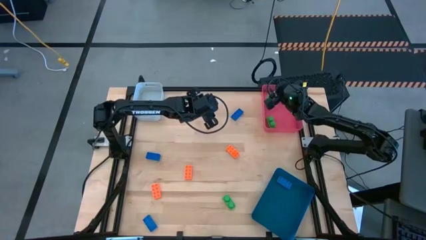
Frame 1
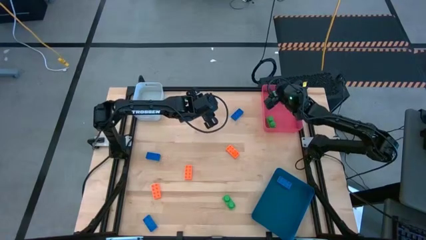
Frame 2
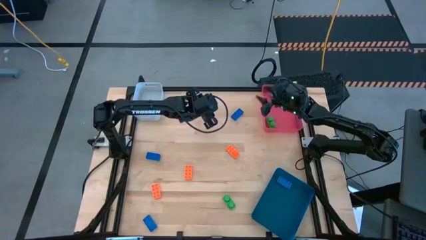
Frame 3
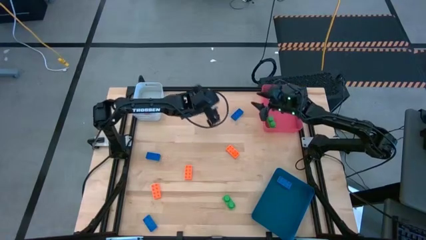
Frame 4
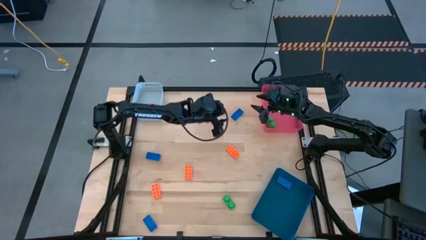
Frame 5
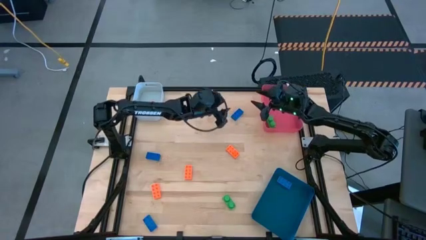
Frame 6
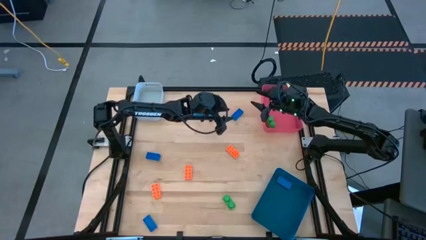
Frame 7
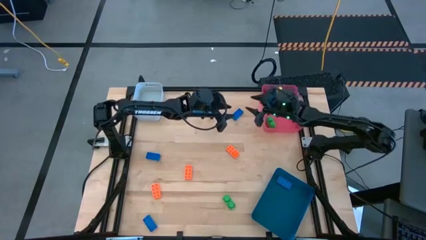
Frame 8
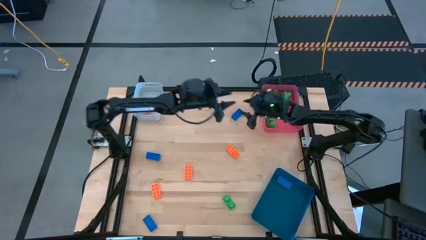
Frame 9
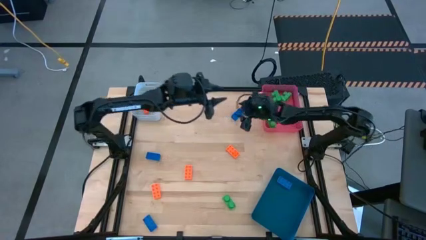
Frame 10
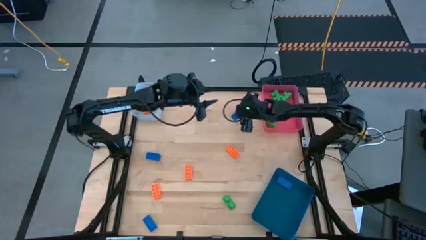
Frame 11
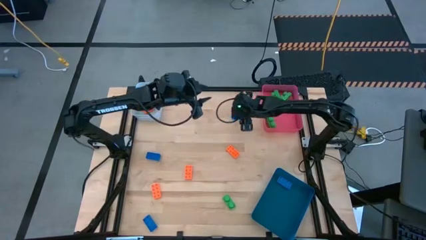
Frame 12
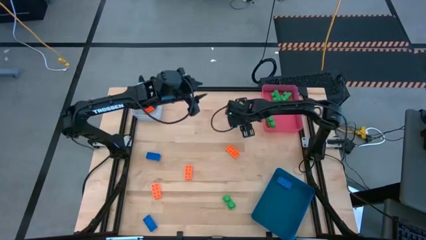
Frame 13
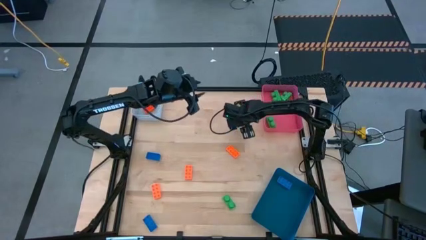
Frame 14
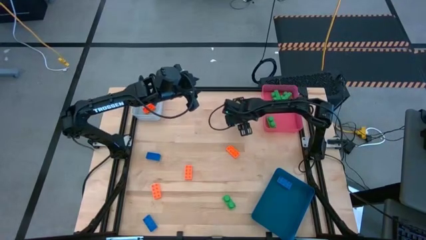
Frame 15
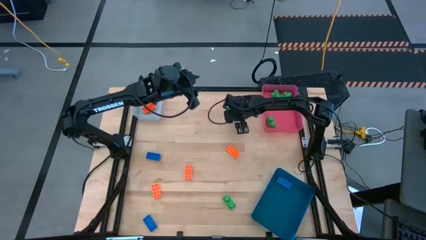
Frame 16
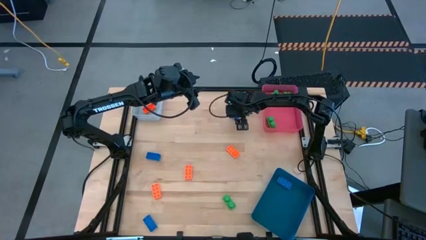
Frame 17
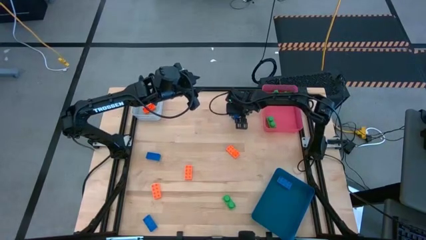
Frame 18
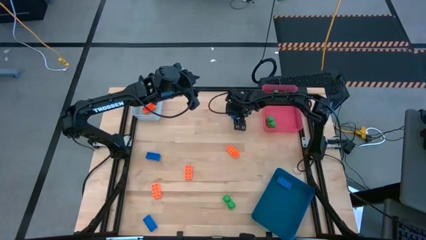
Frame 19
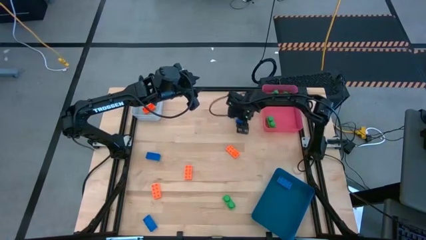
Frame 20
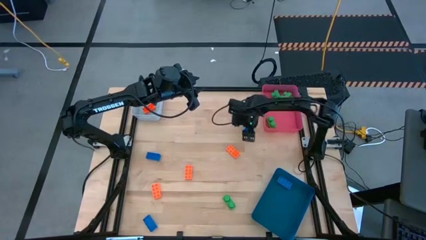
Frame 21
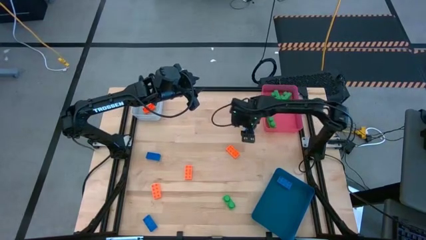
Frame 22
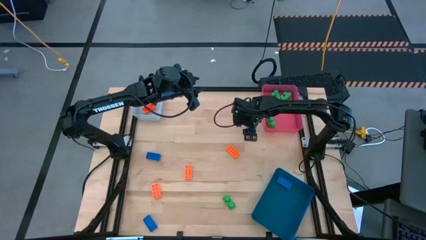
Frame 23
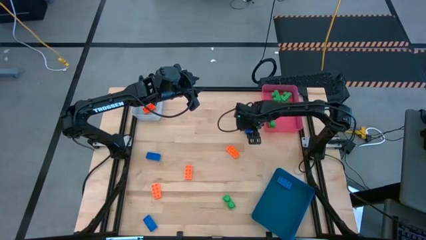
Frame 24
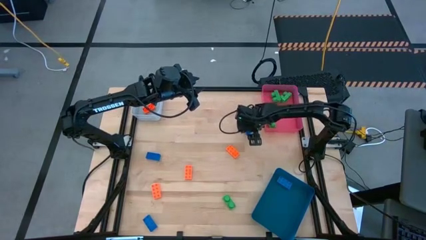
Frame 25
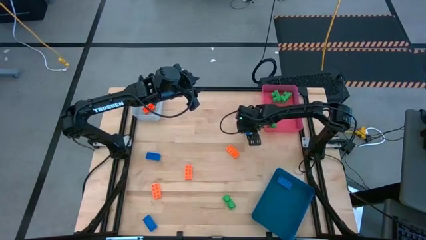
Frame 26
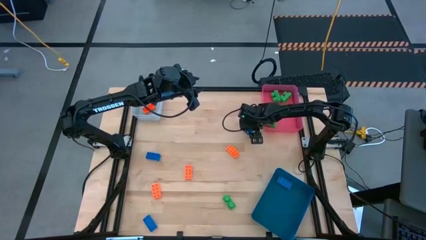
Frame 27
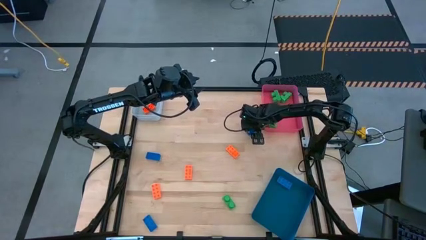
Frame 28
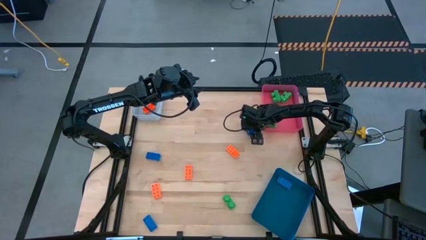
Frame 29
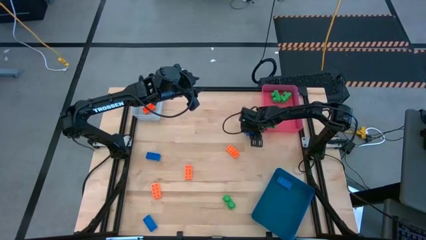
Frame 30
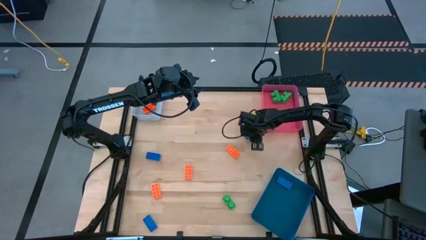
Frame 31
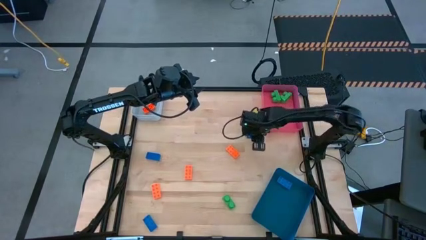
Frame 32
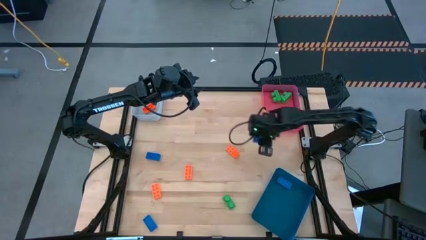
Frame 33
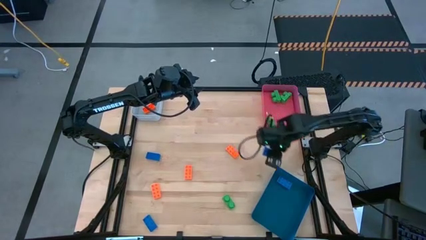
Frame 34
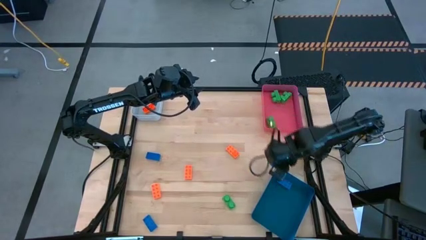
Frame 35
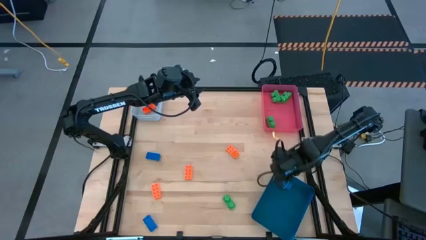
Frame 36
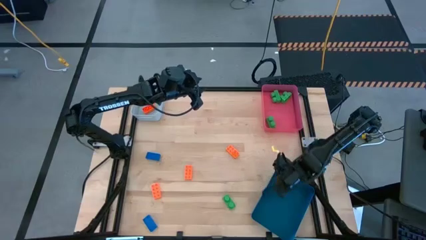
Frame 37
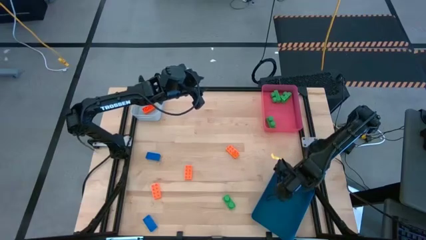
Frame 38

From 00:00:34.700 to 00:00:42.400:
Task: Sort & place blocks by color
Put the blue gamepiece into the blue bin

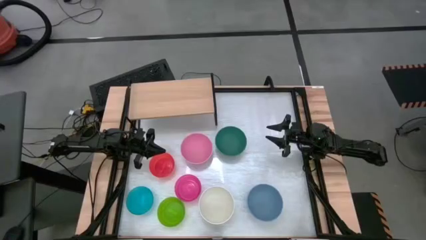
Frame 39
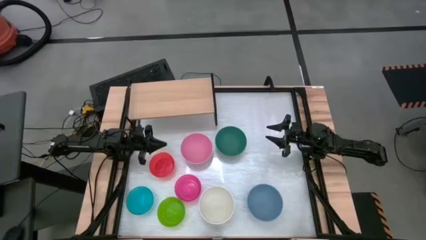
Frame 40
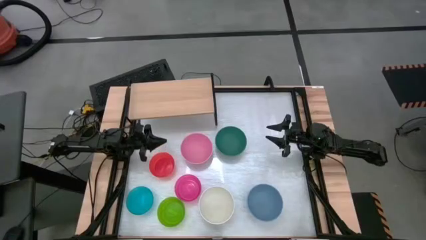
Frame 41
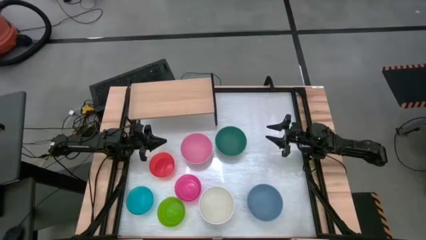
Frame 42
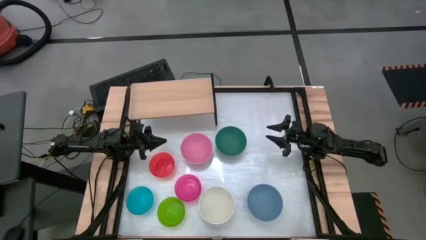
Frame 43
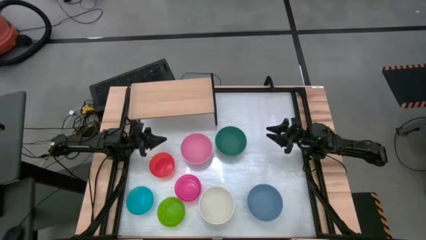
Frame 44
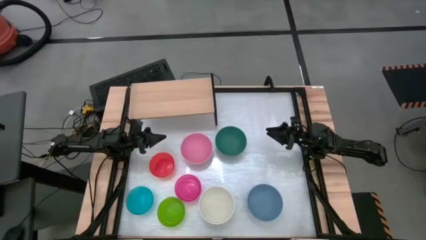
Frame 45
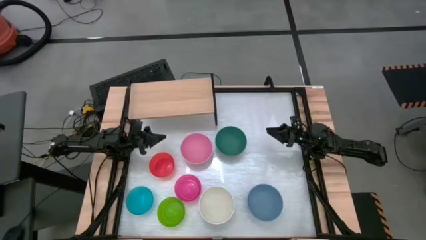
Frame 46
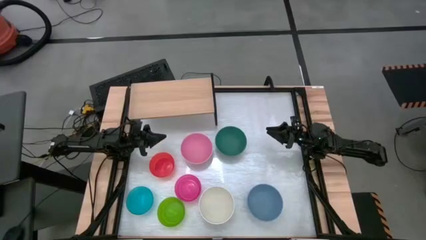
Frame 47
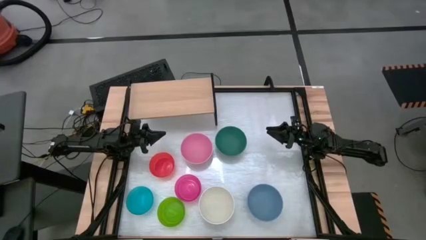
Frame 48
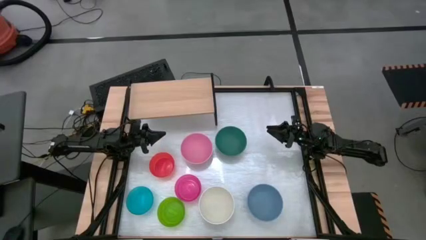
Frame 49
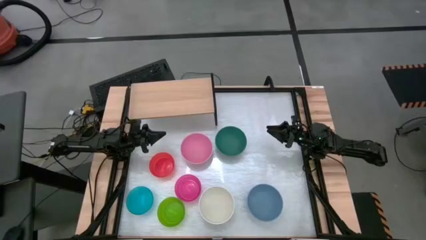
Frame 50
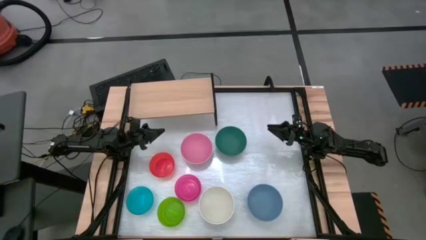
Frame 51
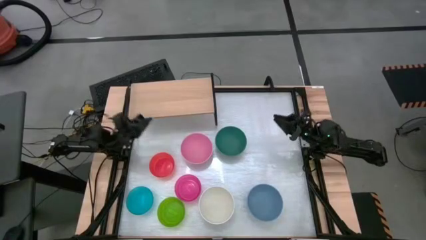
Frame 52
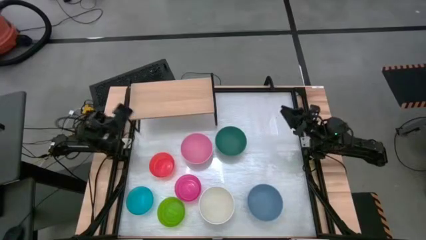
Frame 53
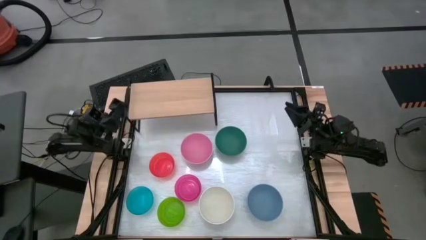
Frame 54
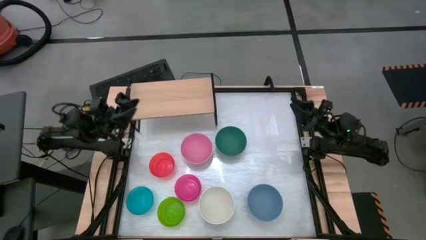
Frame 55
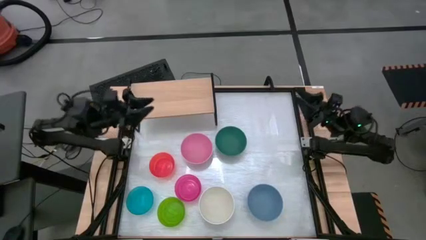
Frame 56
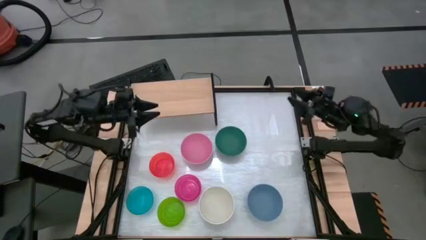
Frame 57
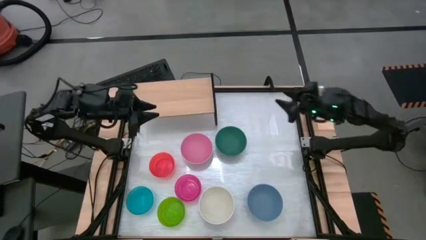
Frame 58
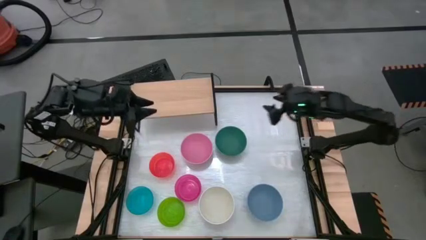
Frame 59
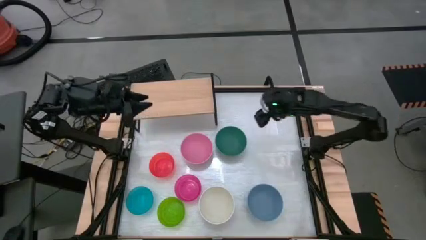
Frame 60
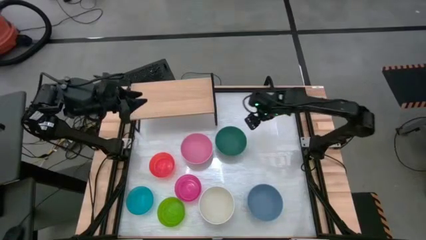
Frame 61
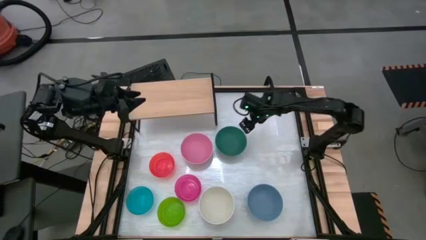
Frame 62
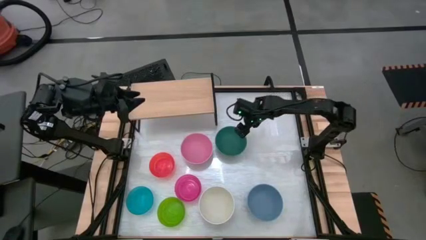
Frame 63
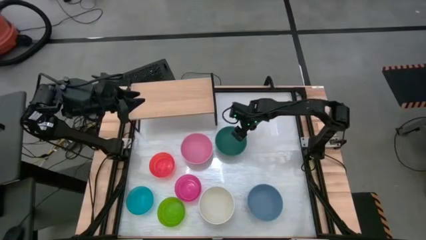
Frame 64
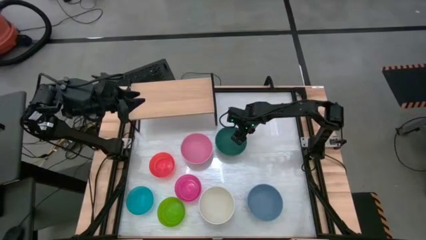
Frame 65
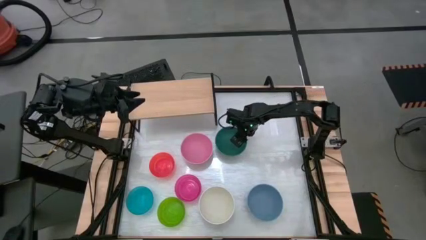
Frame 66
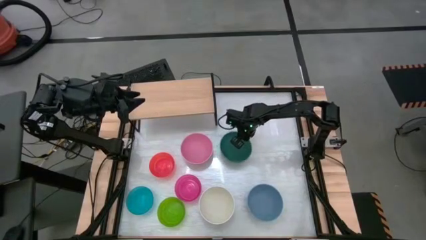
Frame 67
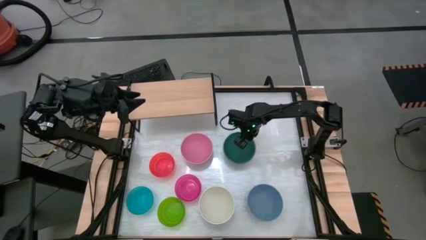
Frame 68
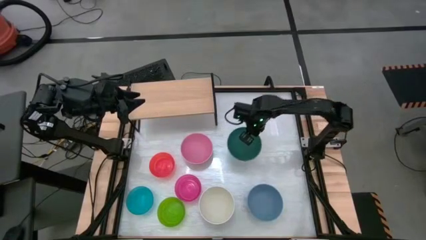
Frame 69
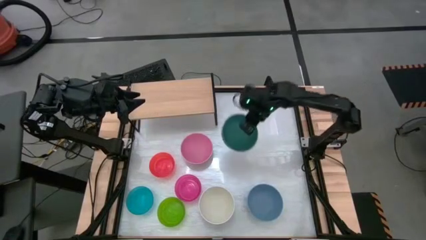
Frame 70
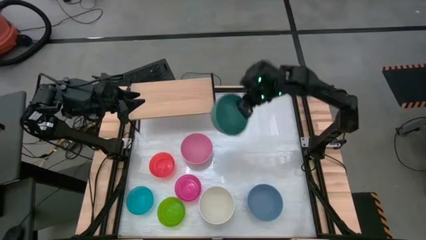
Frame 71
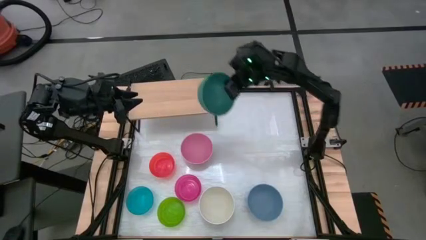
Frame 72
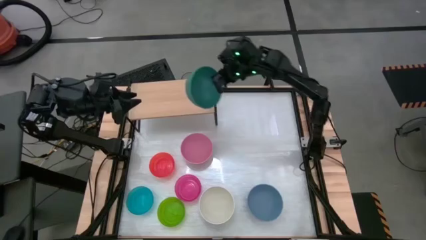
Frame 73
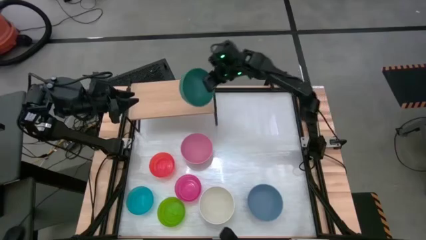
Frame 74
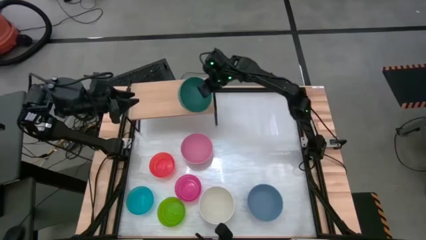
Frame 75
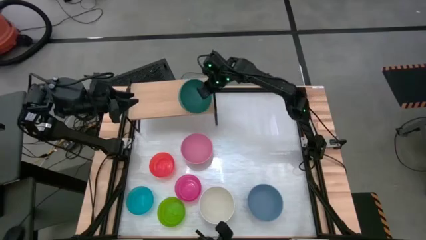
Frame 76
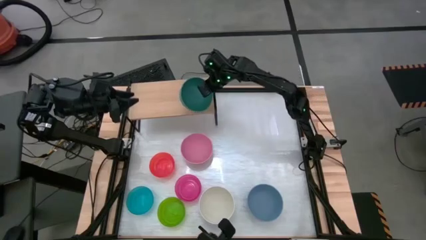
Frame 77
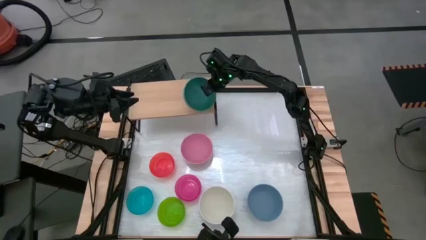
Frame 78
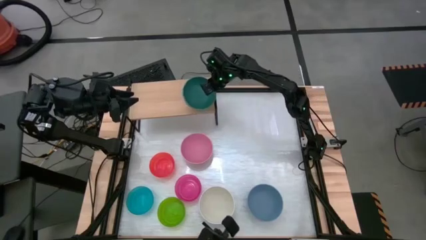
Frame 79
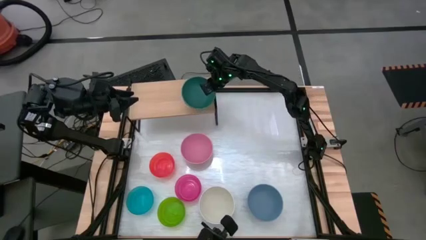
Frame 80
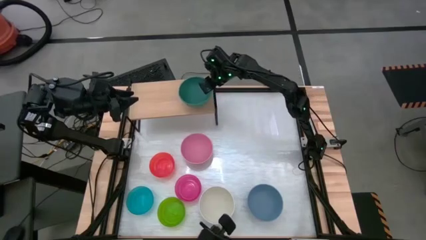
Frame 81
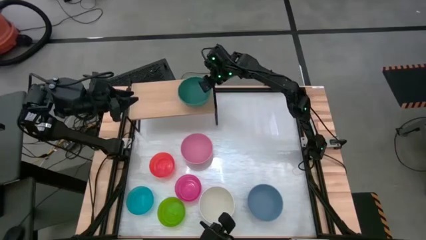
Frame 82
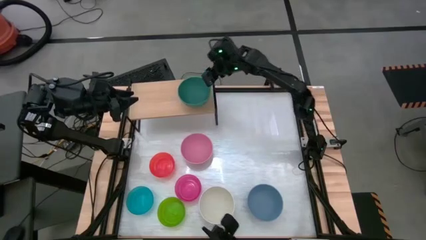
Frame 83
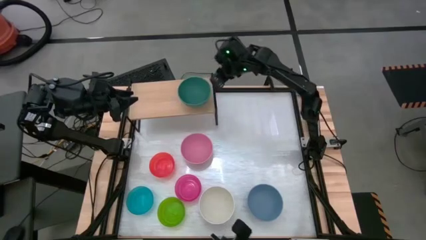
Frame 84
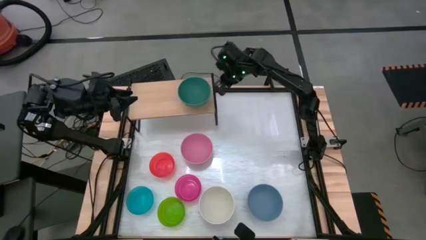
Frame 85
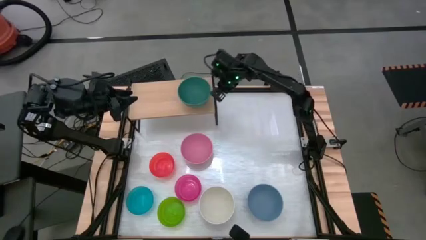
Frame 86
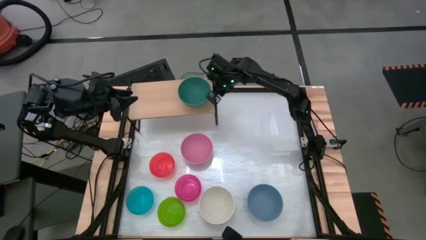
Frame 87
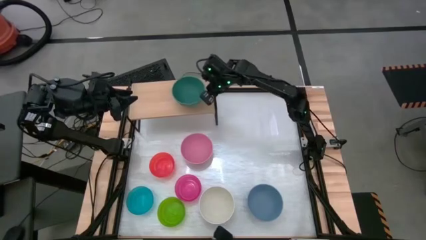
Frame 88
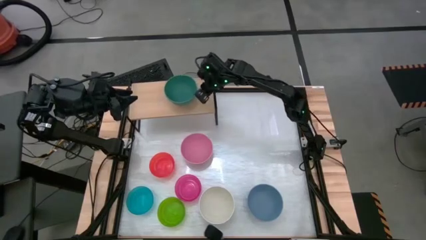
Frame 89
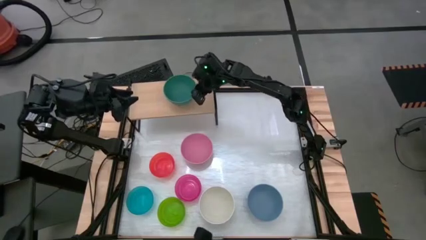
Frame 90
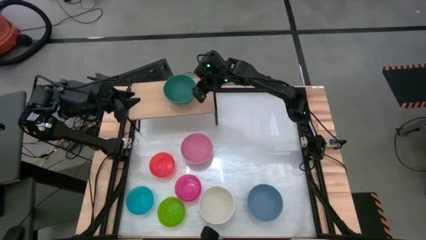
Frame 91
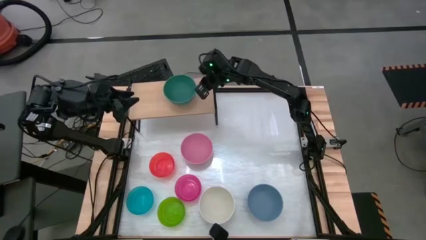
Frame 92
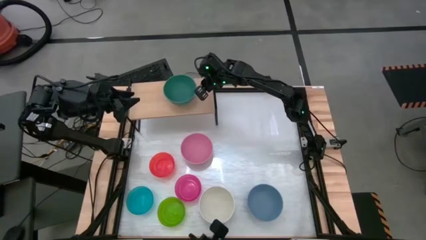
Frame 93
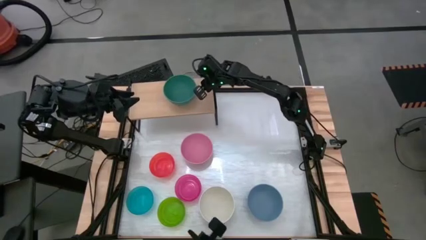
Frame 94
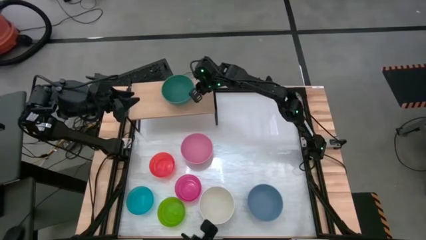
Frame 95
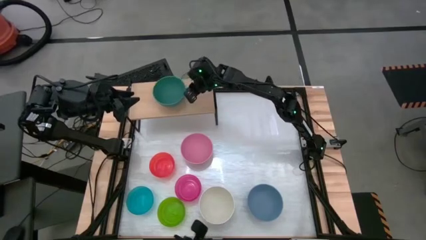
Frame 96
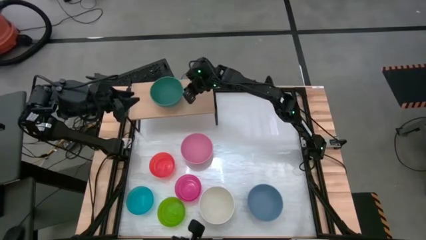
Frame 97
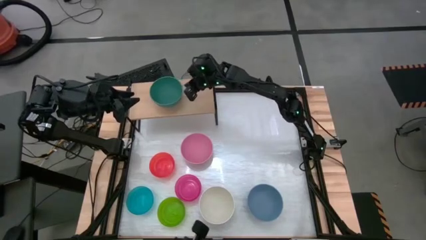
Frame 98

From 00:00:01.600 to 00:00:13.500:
Task: Place and stack bowls onto a shelf
Put the large green bowl on the shelf
